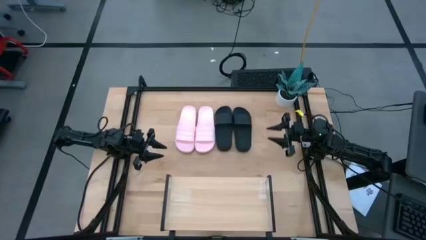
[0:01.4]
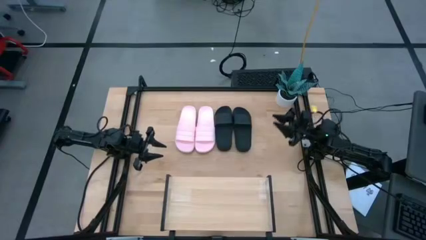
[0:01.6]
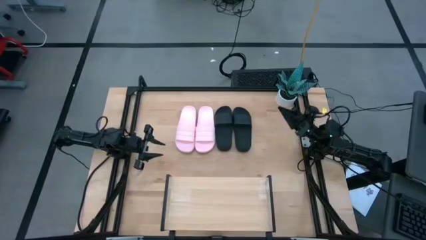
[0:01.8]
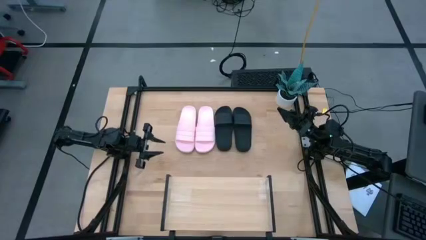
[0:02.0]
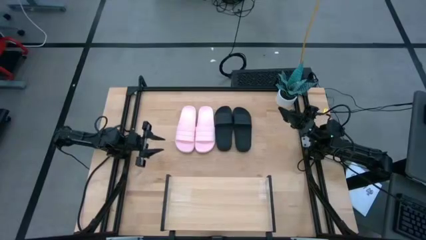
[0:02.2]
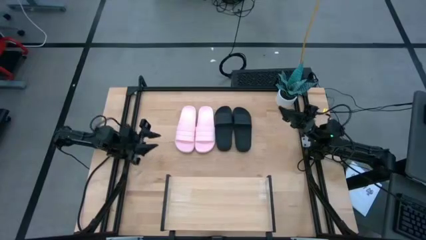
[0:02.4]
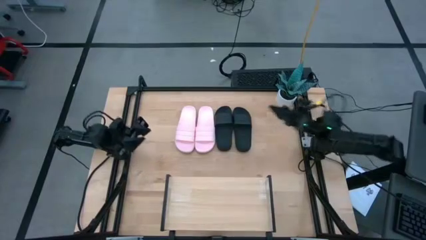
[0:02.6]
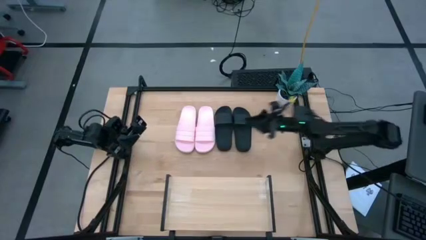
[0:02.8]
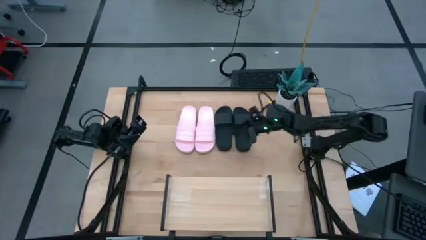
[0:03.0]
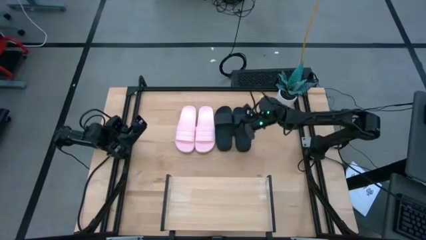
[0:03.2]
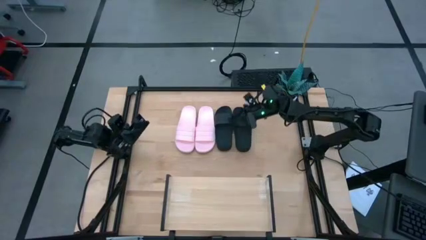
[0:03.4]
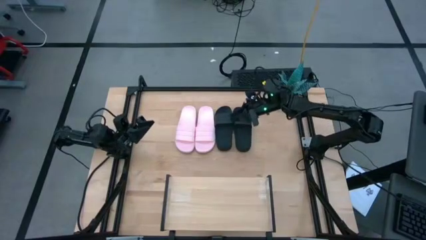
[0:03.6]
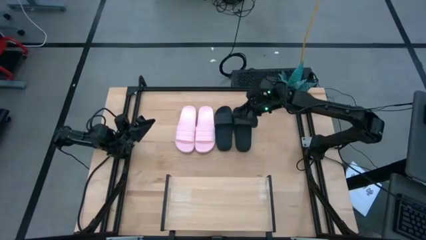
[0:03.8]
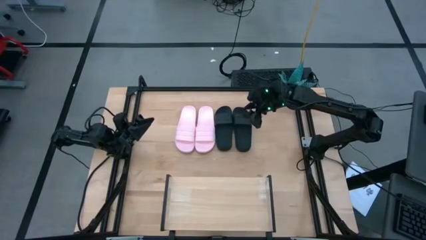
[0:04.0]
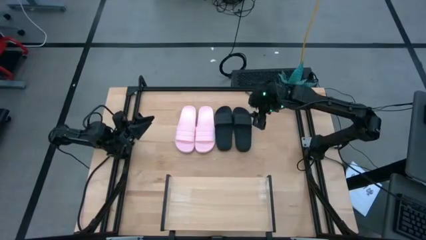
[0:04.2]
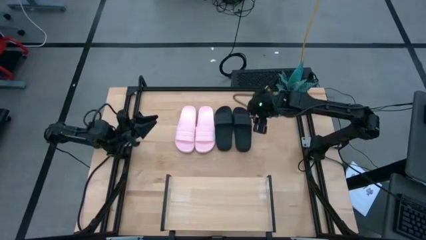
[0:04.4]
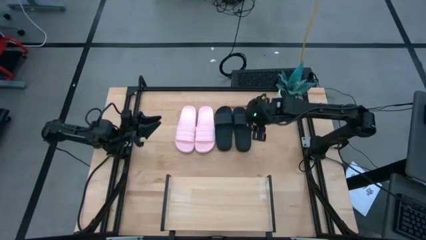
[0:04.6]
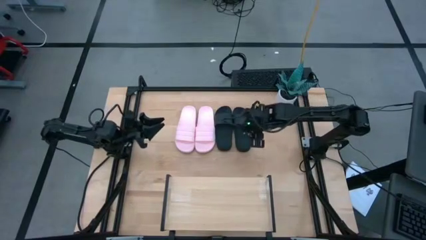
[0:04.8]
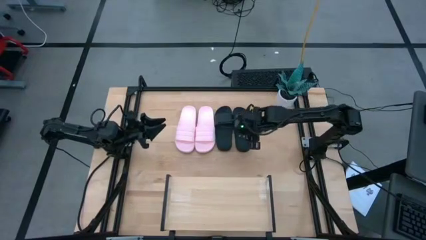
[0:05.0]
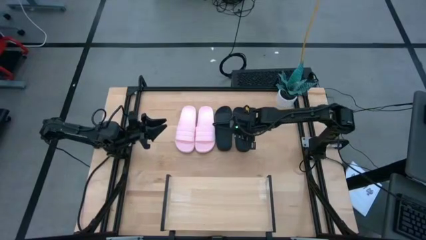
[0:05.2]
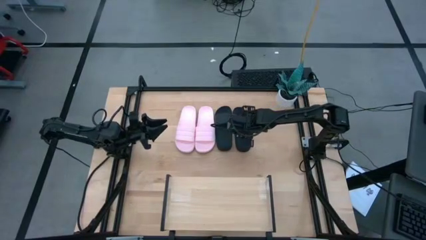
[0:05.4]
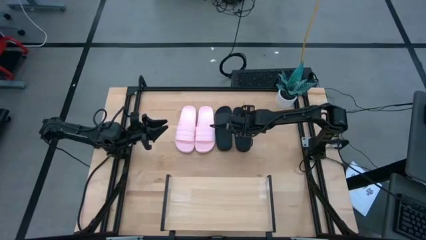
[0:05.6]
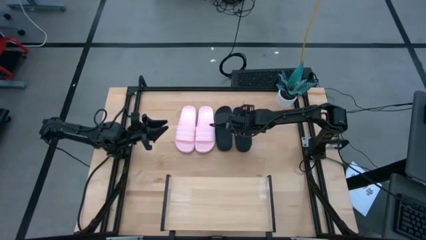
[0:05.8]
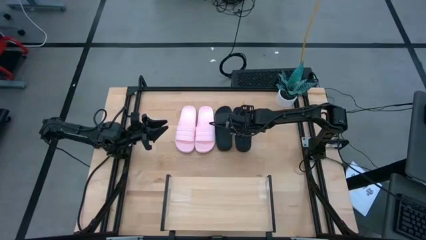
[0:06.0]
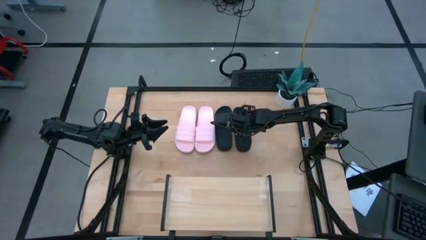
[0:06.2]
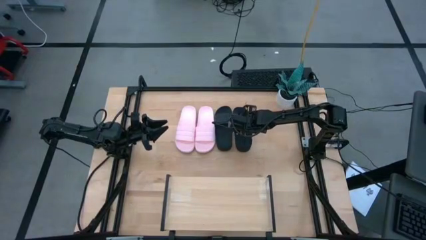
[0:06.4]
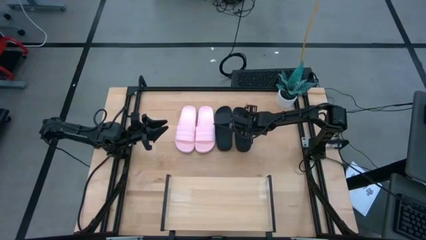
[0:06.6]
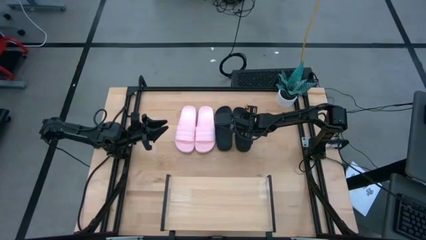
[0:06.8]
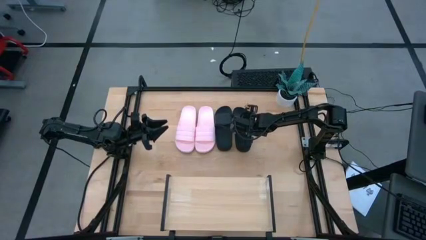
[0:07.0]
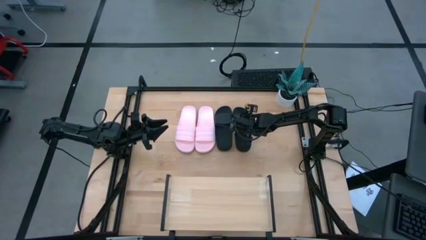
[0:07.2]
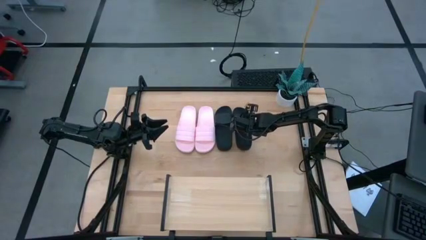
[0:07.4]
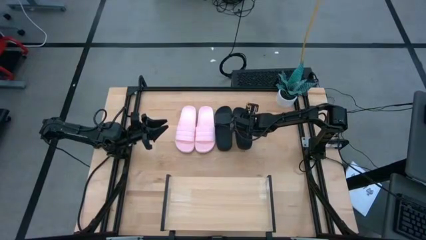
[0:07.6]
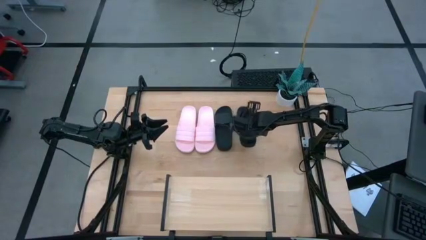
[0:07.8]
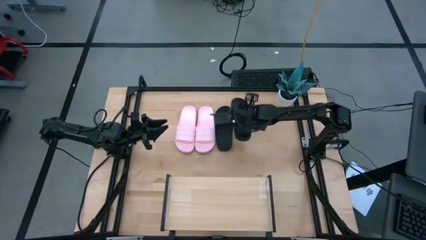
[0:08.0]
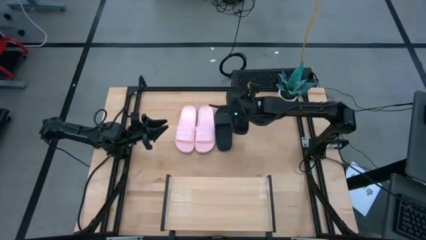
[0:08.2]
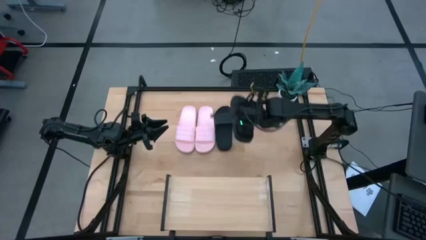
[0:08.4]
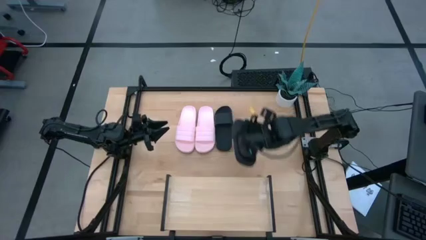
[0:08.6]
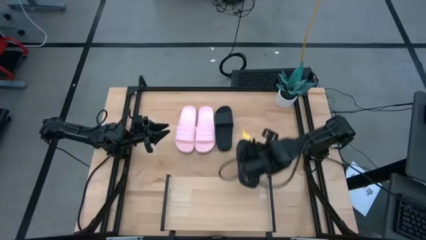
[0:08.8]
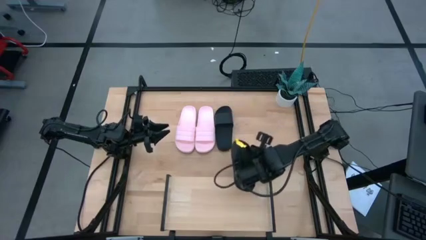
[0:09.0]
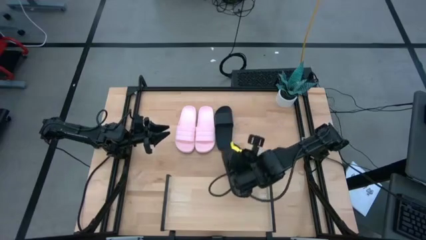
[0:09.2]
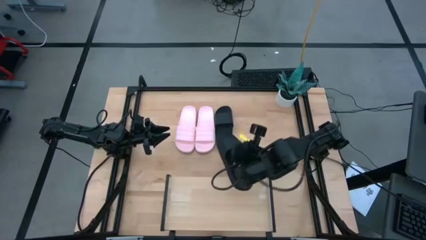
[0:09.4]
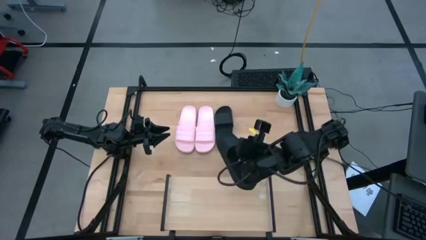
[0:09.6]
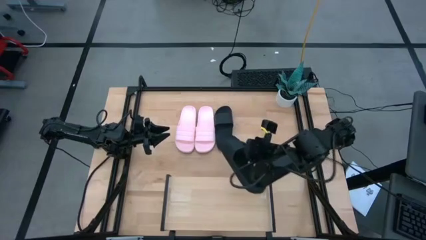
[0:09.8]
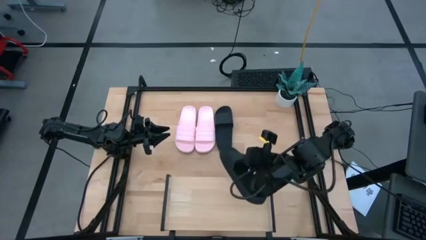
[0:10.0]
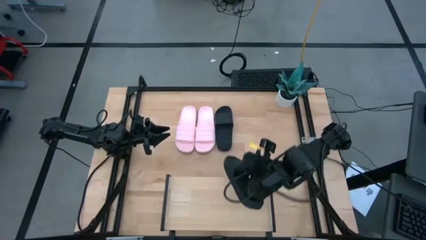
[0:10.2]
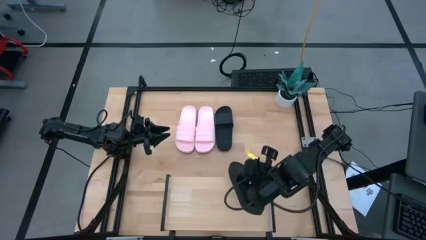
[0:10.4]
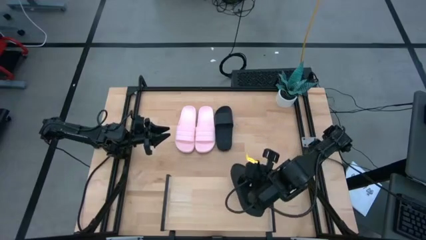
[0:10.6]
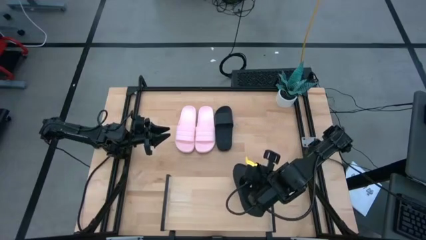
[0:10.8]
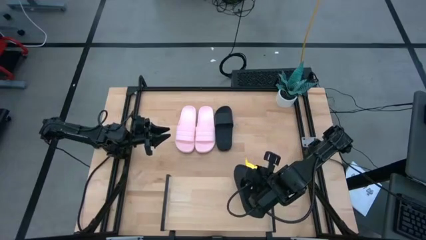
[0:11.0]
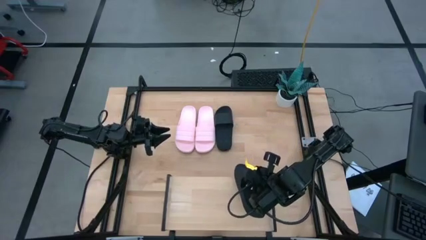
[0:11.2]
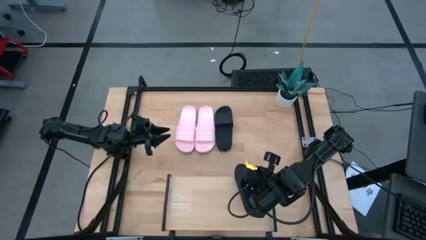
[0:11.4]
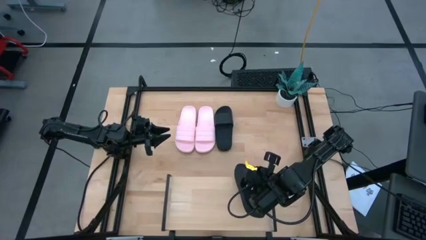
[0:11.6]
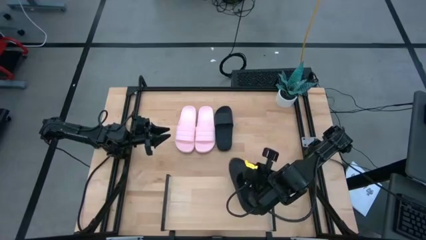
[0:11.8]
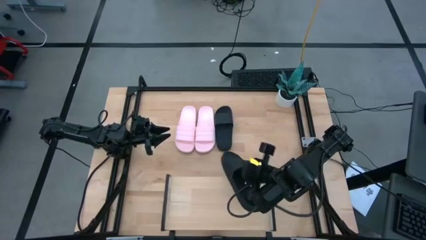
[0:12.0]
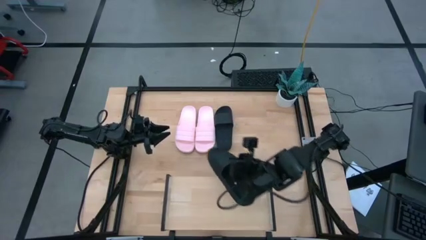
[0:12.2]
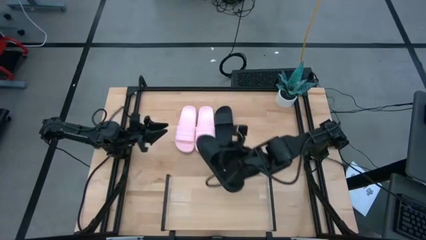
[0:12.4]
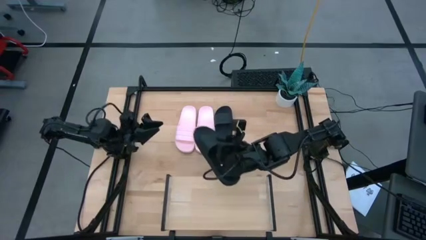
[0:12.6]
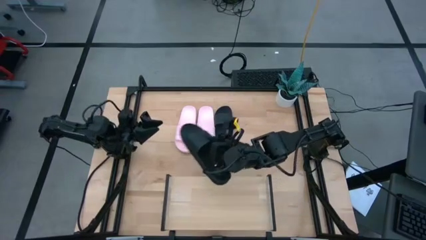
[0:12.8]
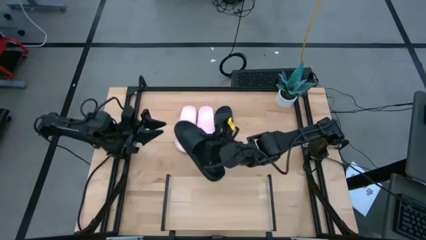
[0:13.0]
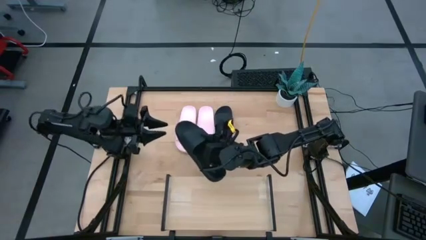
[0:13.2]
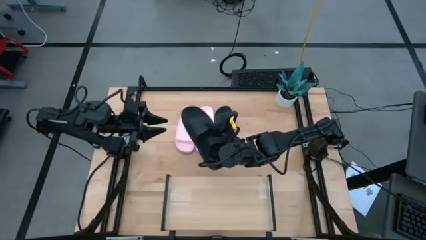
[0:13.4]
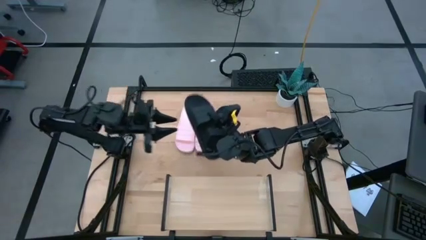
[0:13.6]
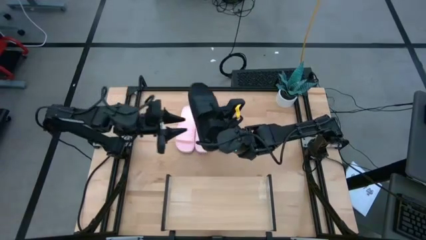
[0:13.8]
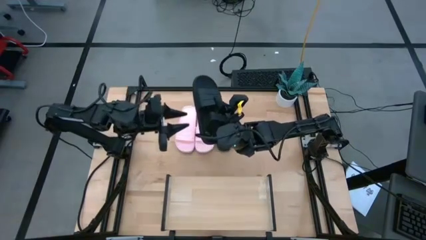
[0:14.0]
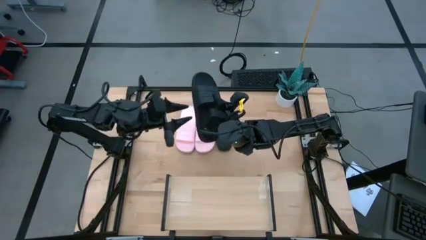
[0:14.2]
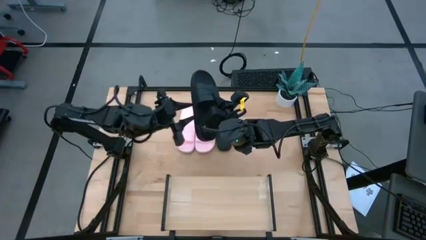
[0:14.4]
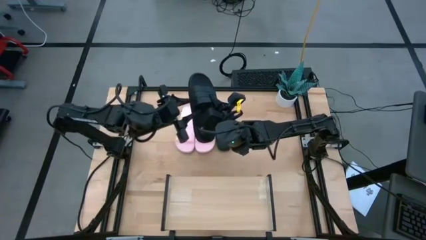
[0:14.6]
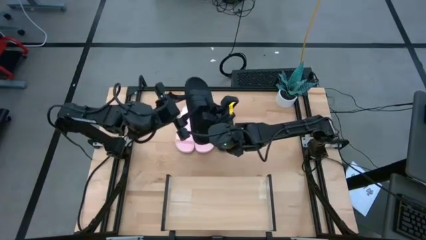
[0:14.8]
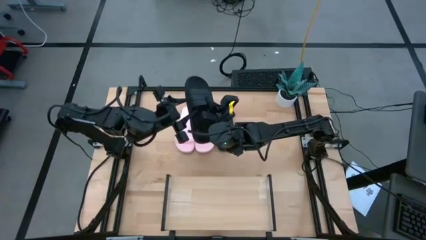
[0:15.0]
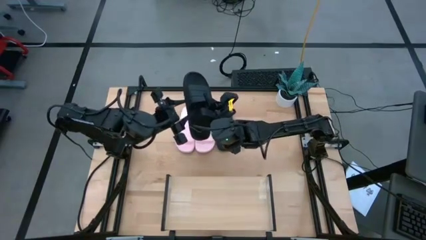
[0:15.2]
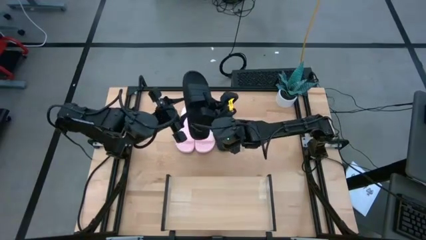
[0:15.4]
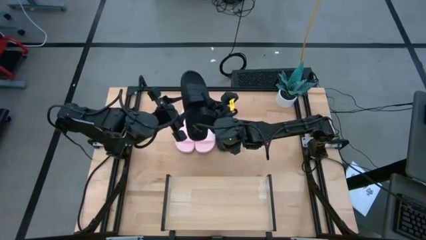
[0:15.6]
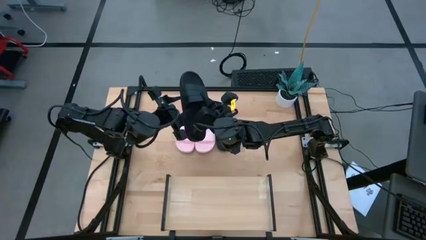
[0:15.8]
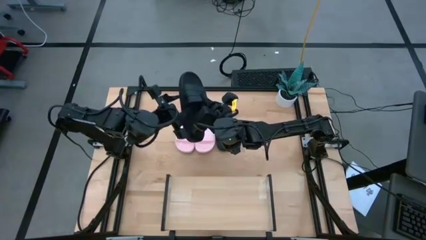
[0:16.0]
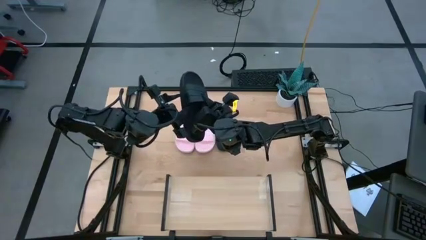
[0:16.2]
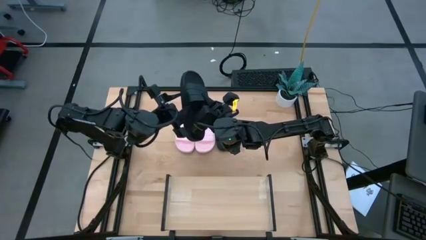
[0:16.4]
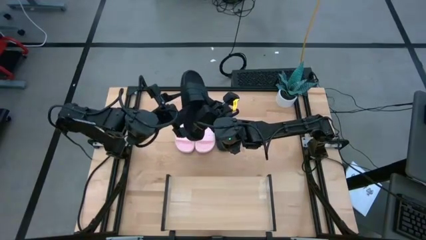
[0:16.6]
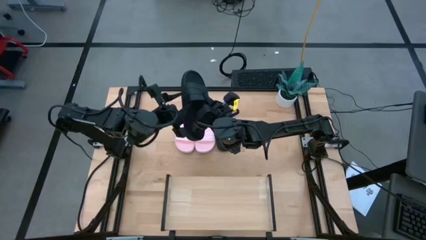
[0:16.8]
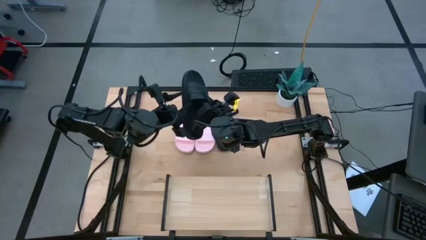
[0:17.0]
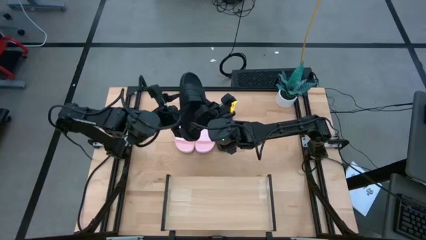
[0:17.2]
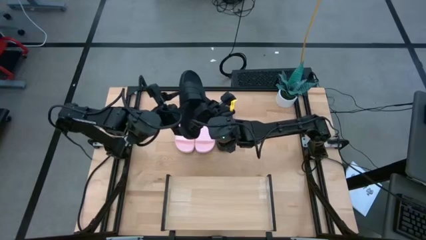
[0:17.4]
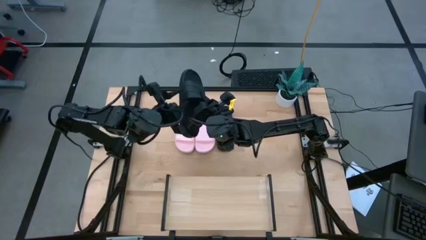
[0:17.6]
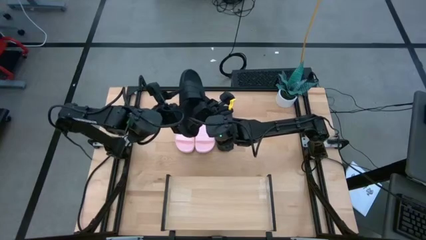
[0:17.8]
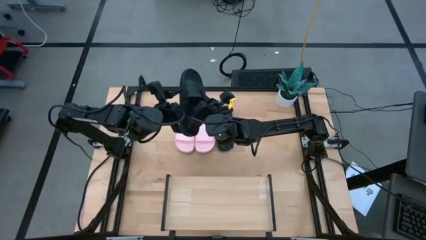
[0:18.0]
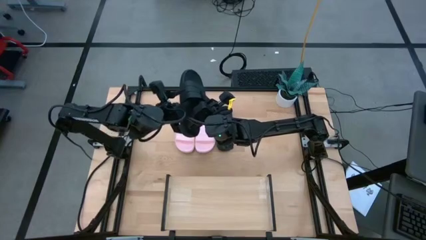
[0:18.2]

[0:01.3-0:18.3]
Task: Pick and place slides into the shelf
Put the right black slipper on the shelf
